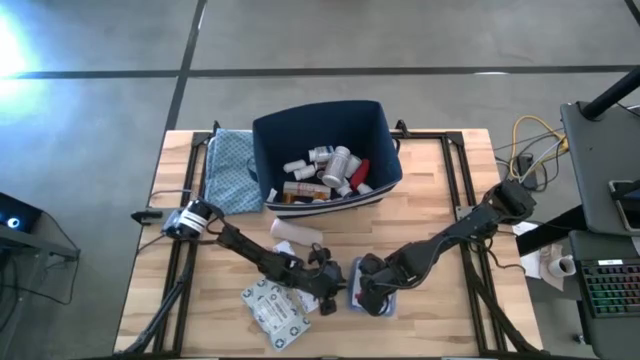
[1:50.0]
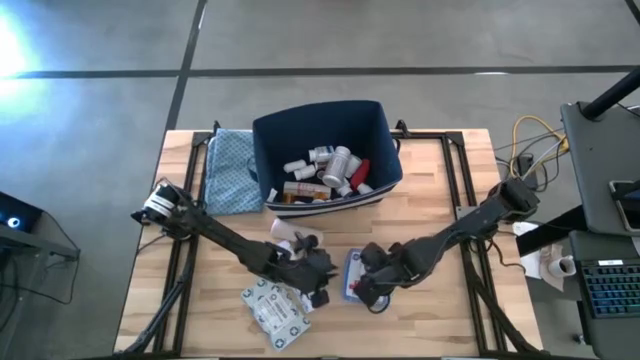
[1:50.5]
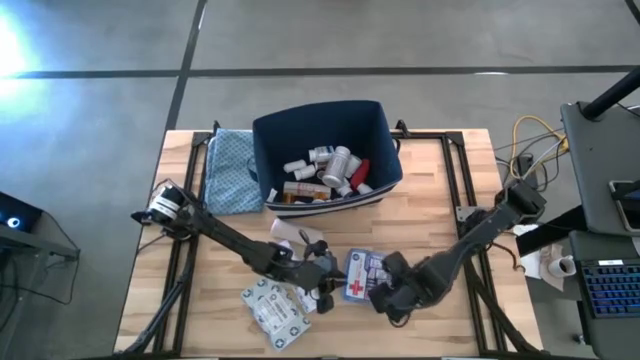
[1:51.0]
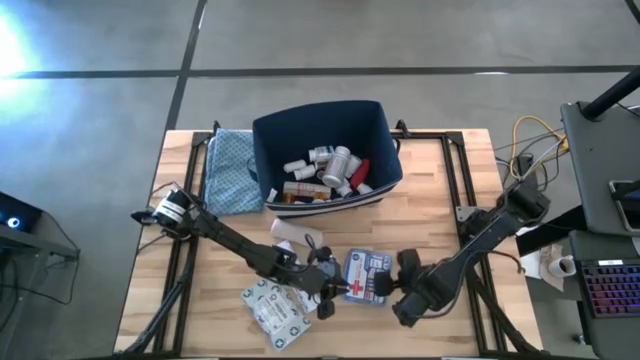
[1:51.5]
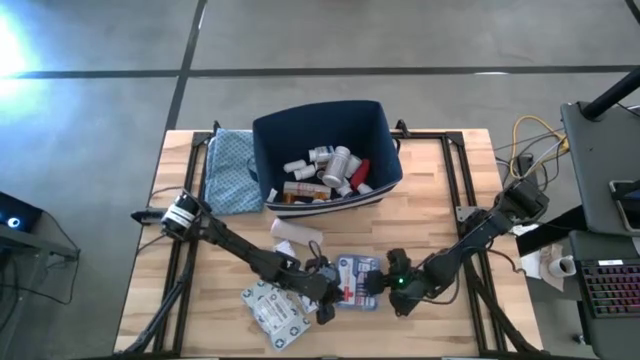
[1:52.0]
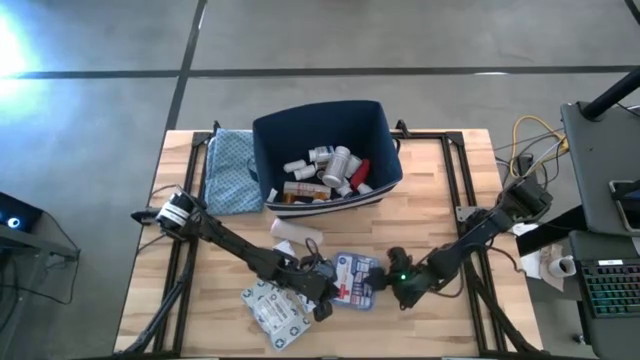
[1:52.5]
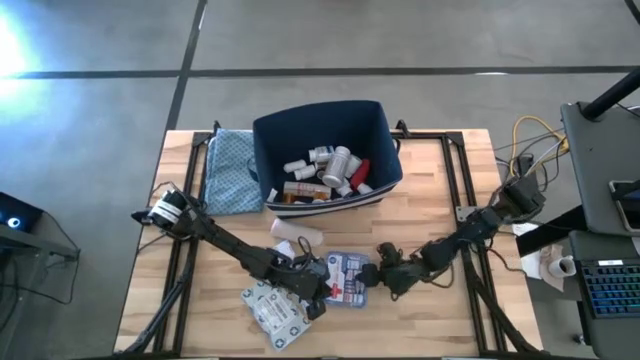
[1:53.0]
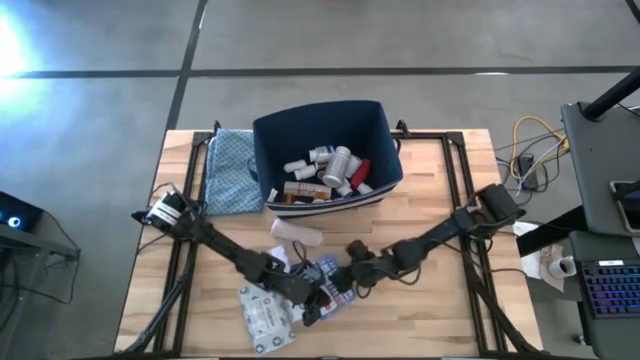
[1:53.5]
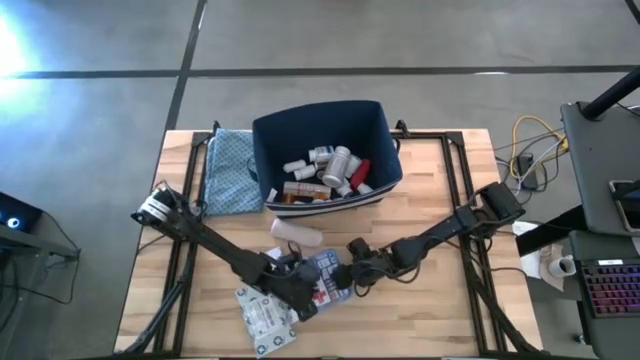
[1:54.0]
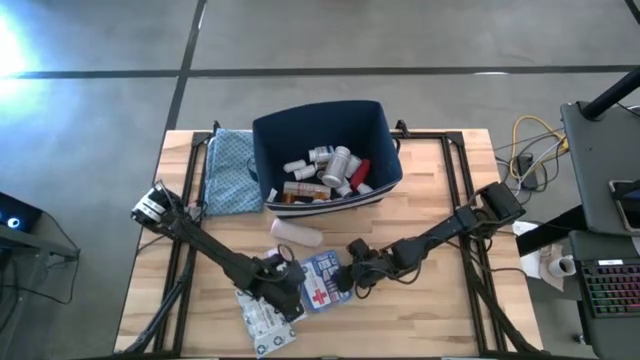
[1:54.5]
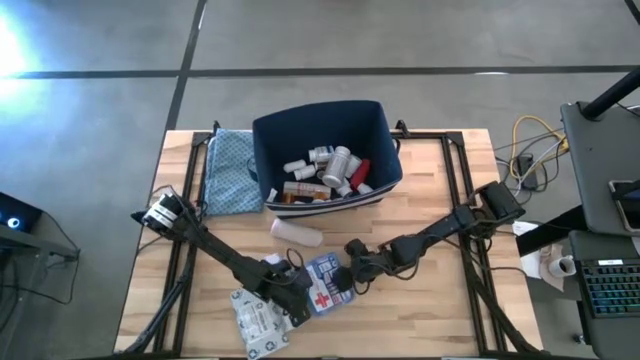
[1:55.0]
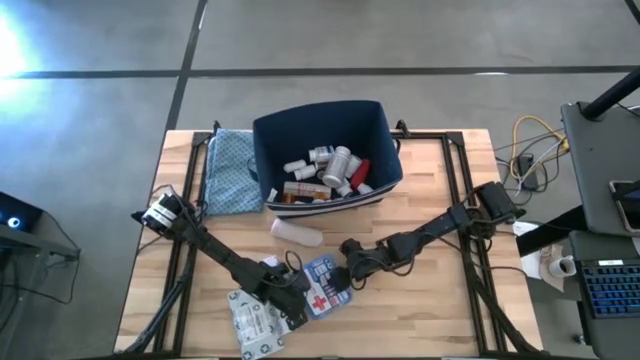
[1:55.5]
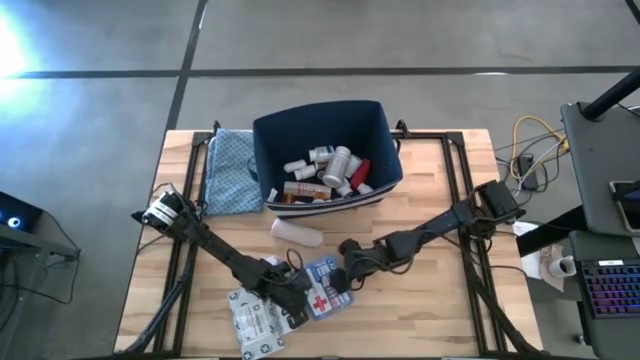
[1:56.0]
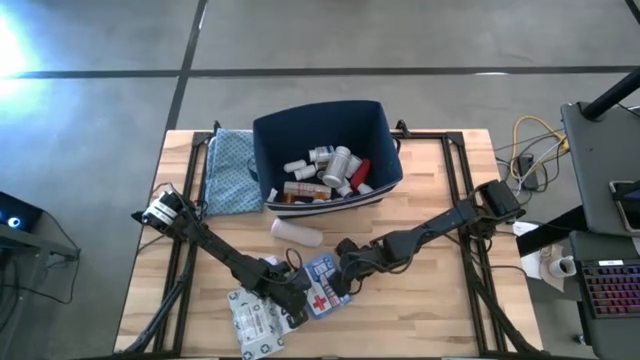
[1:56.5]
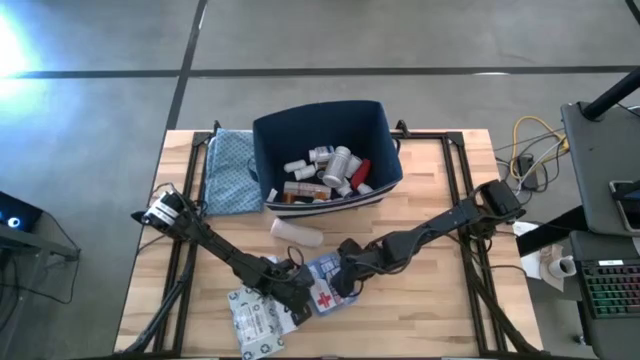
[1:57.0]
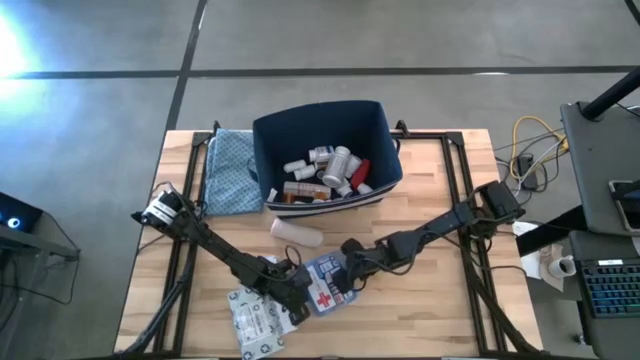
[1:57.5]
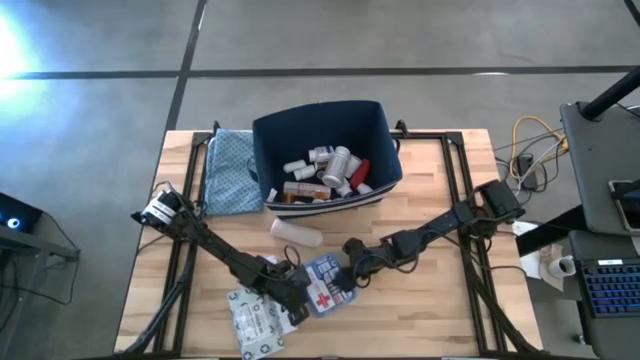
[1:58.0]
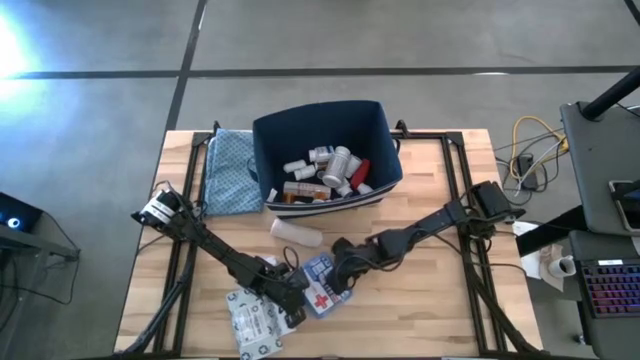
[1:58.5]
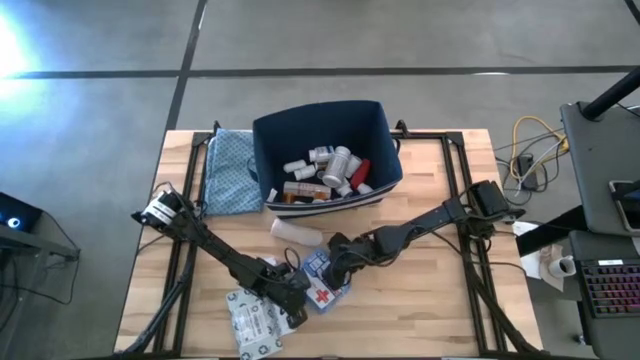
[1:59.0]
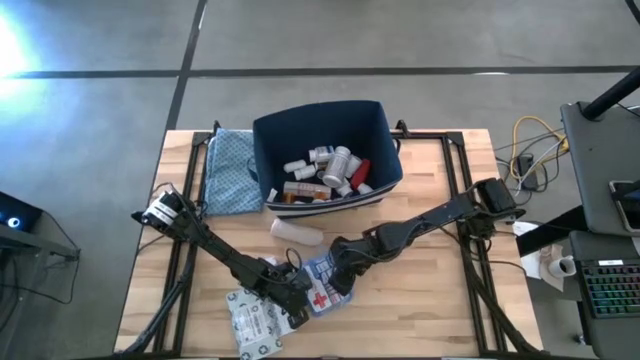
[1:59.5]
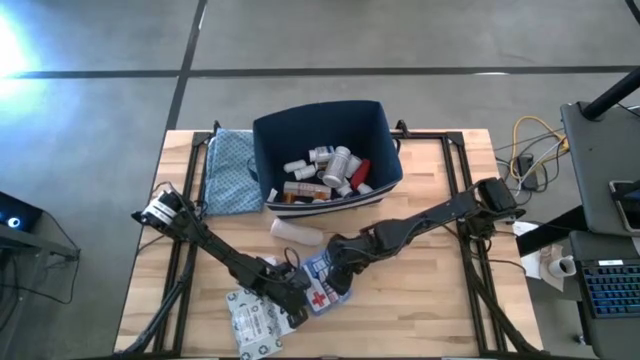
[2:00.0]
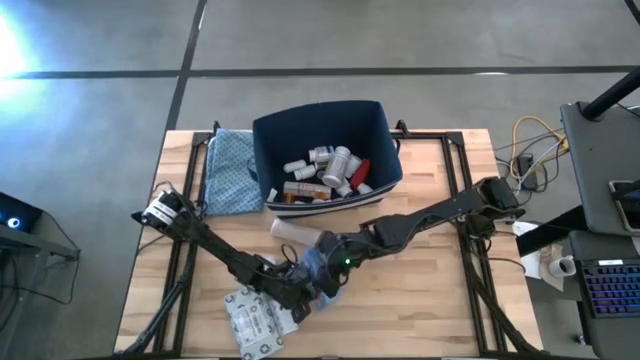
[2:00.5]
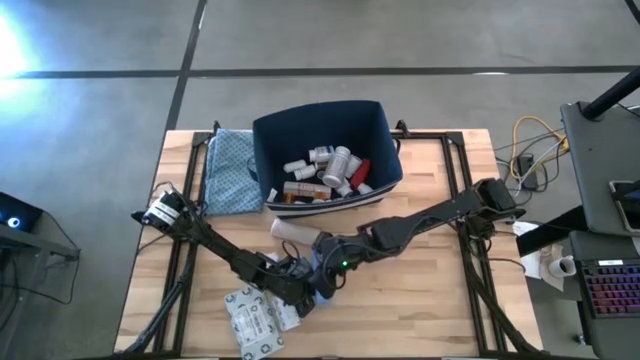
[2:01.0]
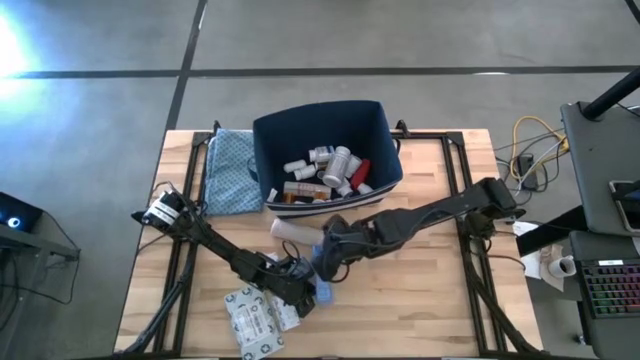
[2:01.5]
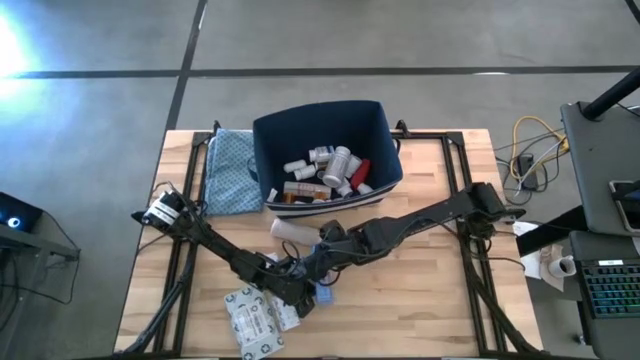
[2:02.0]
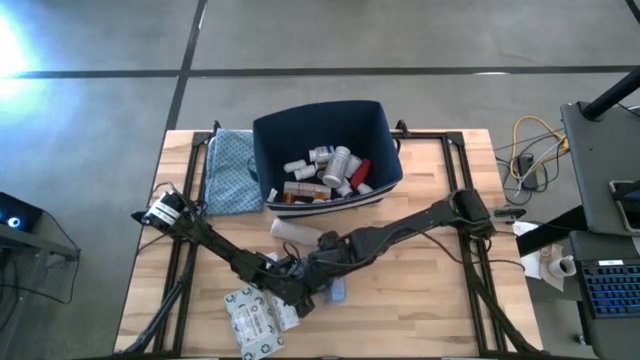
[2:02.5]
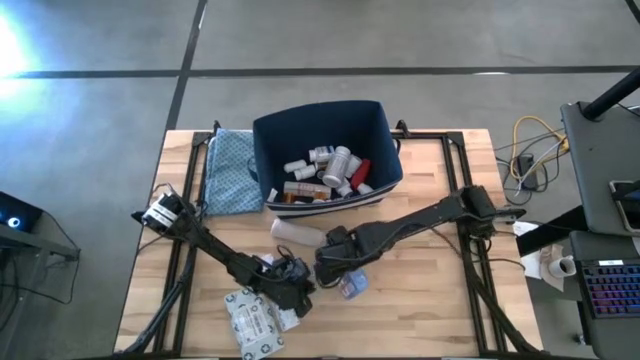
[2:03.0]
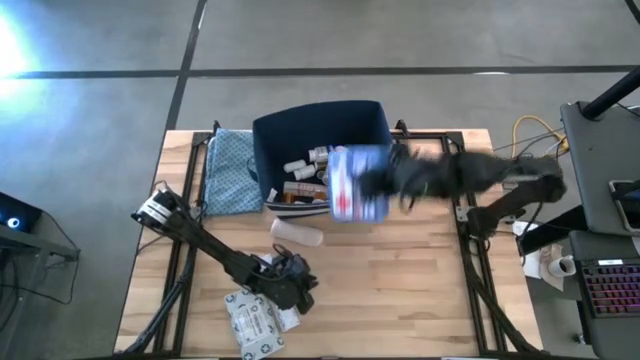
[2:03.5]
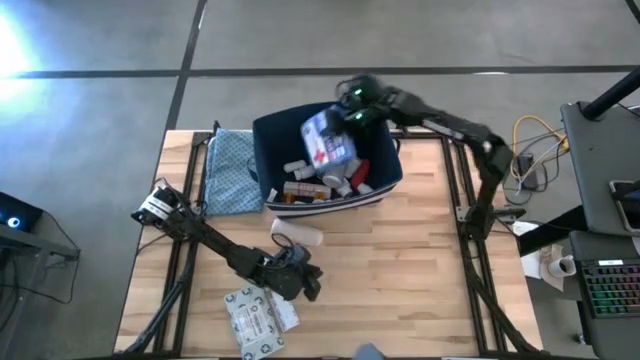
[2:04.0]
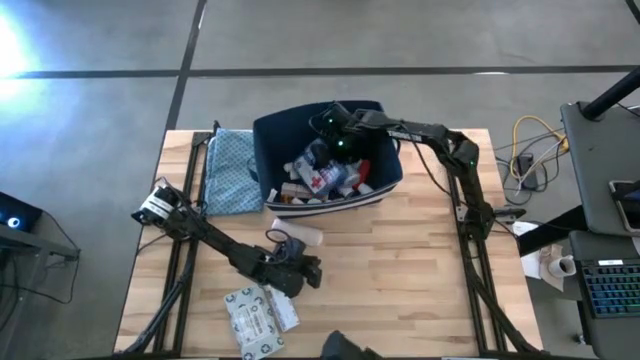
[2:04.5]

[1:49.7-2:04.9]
Task: Pick & place medical supplies in basket/bin
Put the blue first aid kit into the blue bin

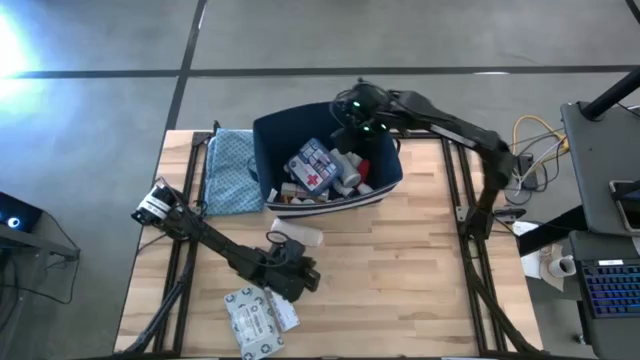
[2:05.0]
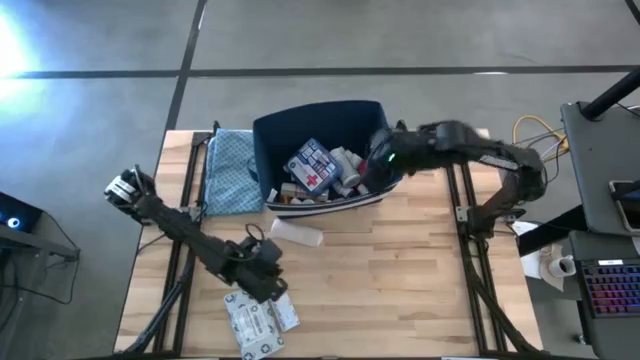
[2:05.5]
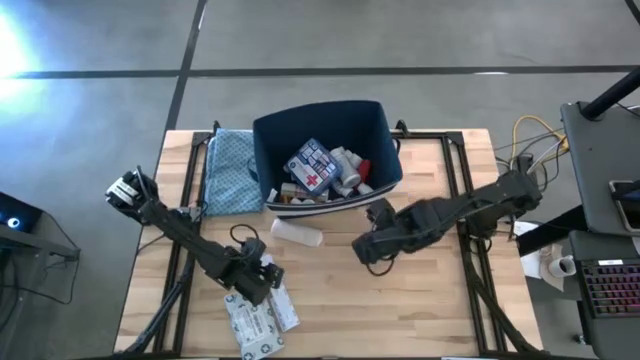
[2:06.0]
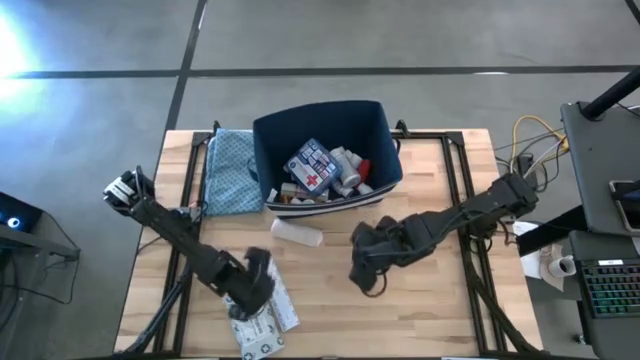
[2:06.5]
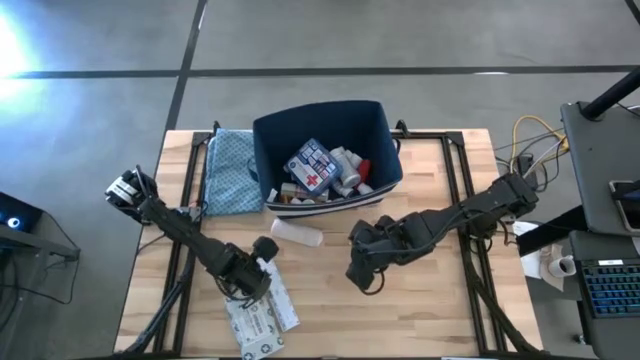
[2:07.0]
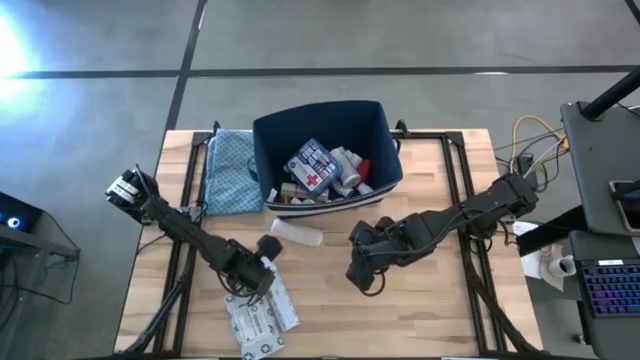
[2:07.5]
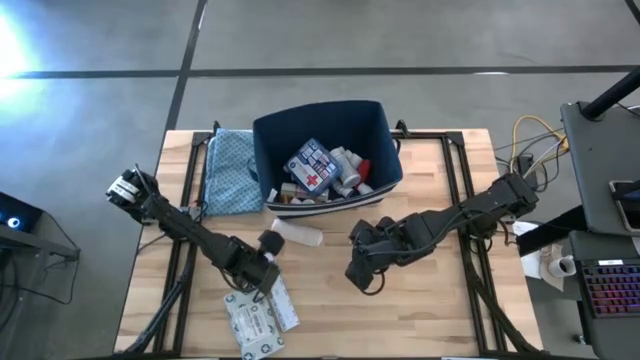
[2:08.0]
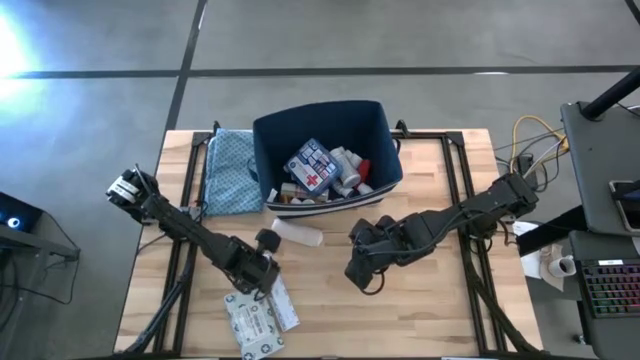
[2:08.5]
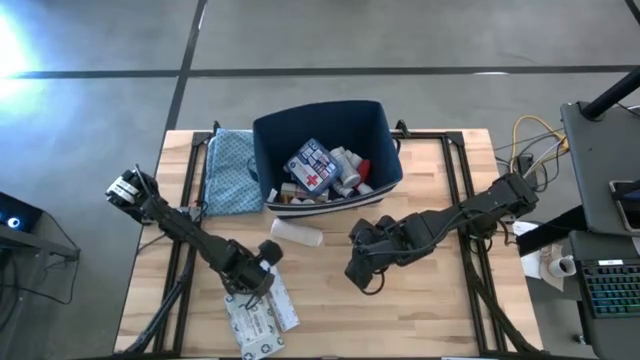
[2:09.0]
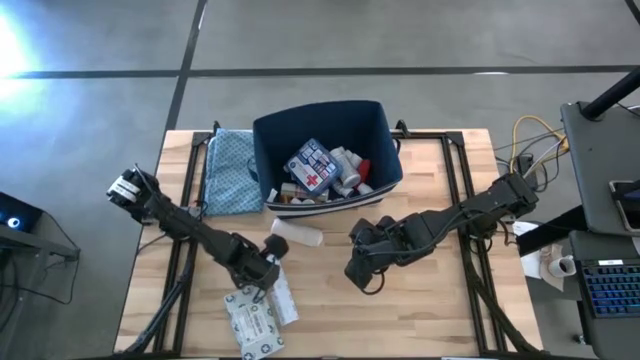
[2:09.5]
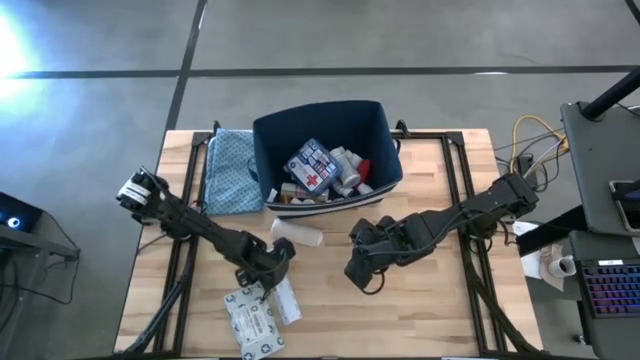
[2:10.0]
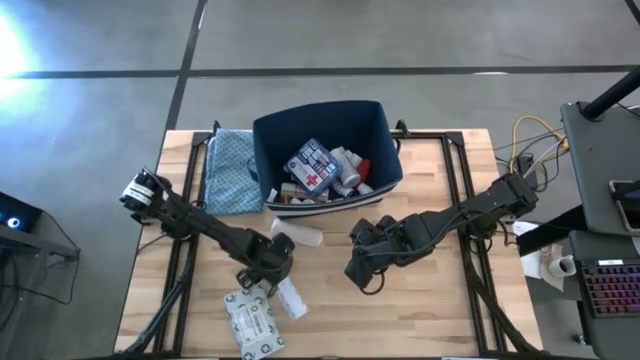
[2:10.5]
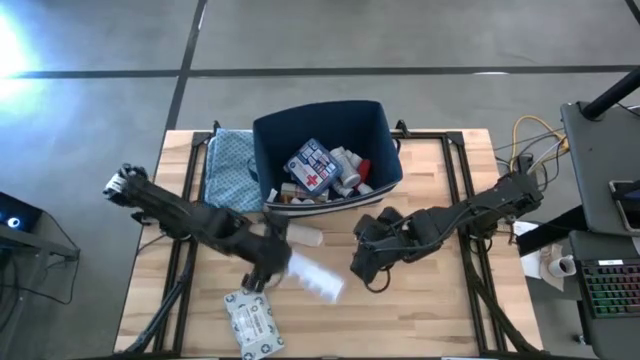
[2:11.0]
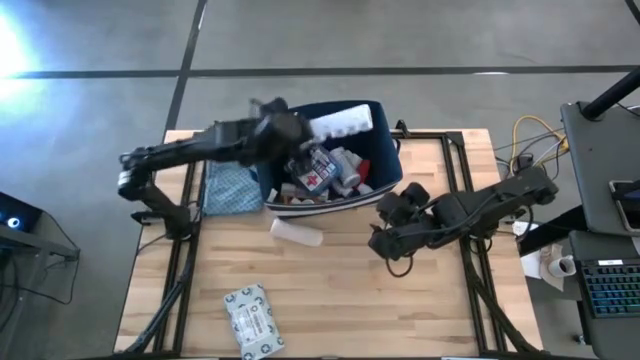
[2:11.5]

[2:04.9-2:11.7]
Put the medicine organizer into the blue bin

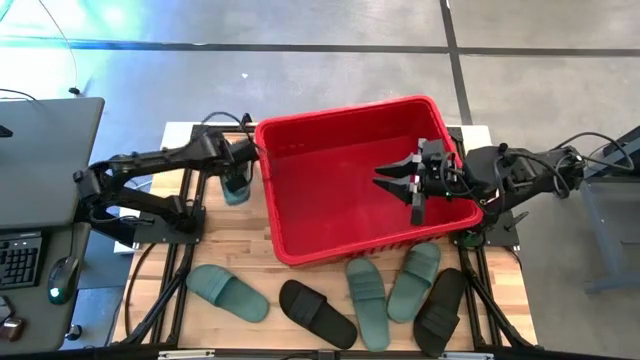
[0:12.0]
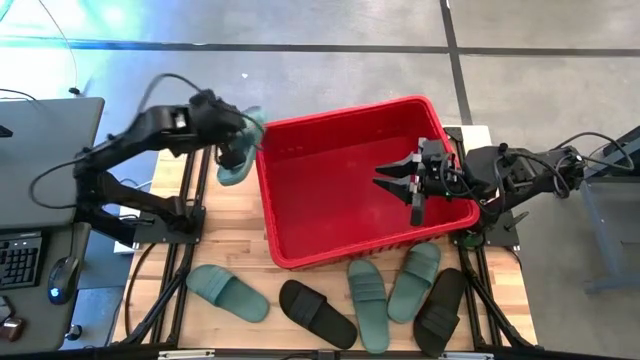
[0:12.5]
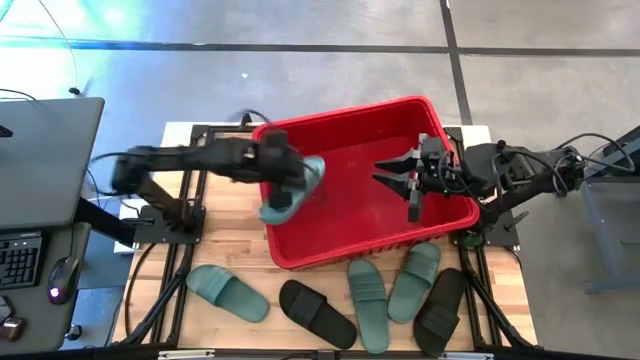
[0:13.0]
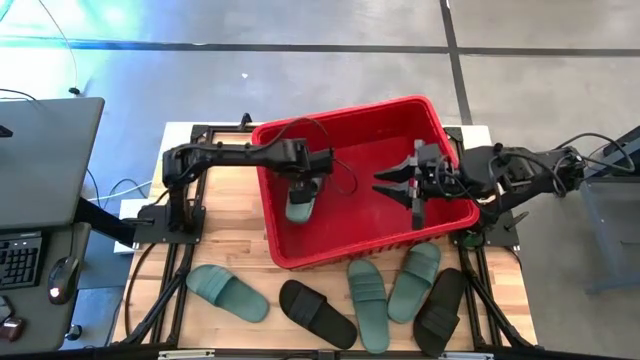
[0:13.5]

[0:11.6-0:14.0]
Task: Pick and place slides into bin
Put the green slipper into the red bin
